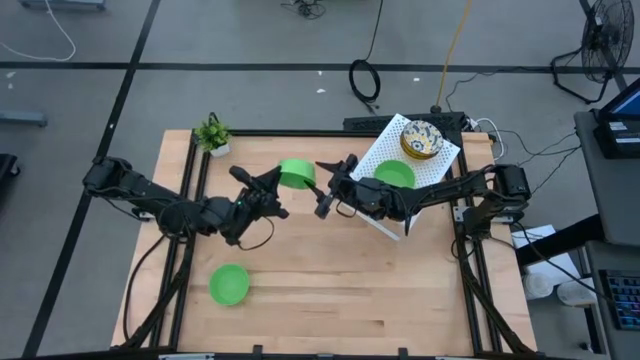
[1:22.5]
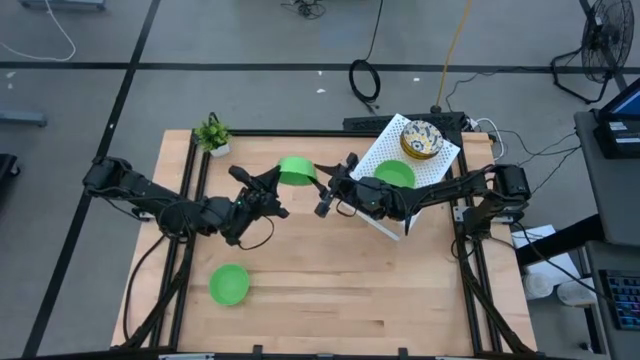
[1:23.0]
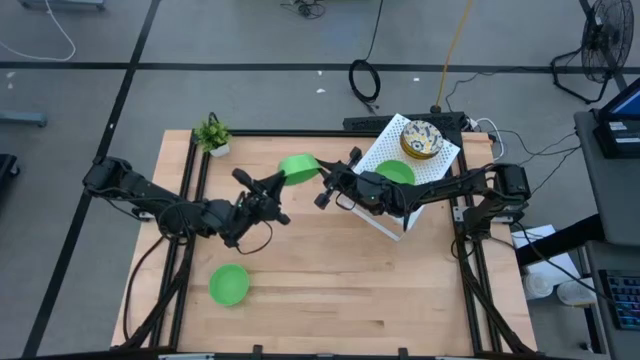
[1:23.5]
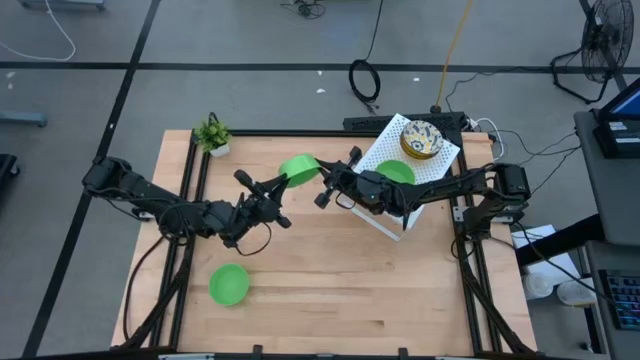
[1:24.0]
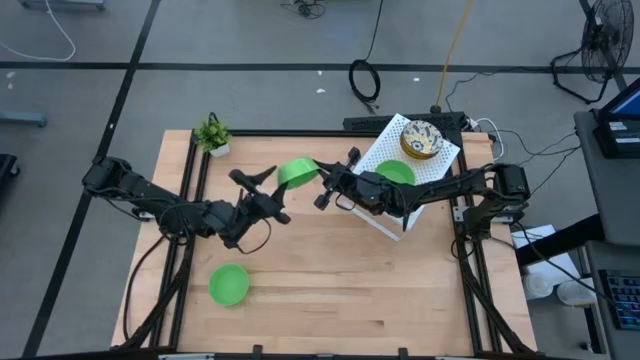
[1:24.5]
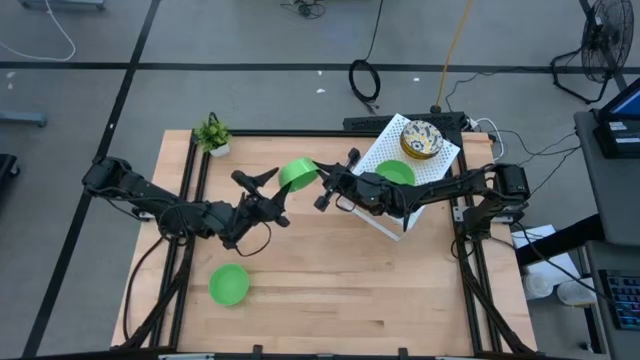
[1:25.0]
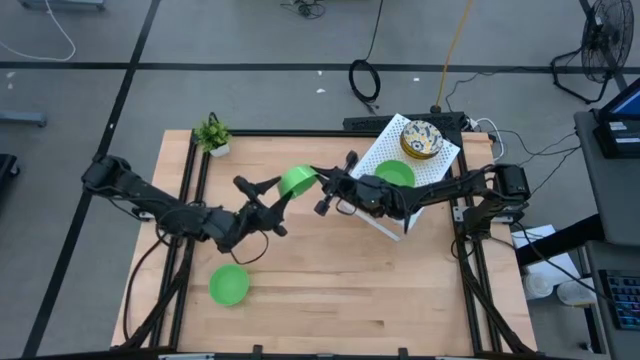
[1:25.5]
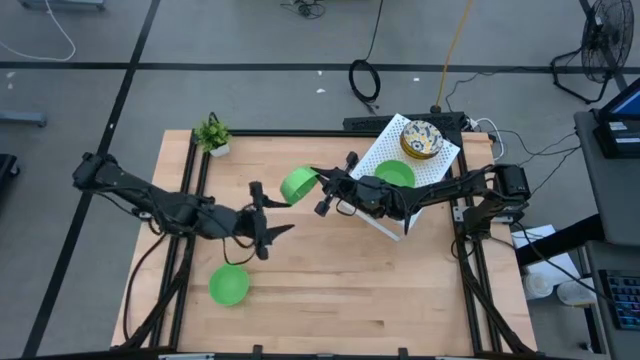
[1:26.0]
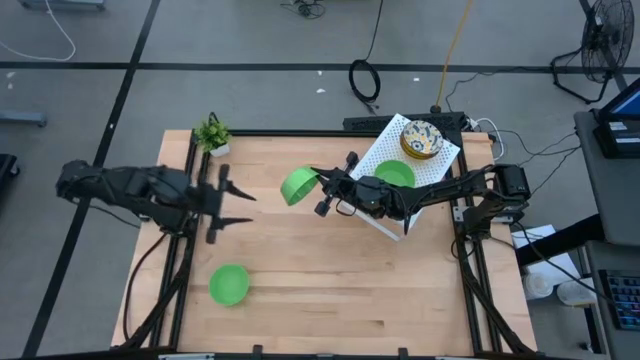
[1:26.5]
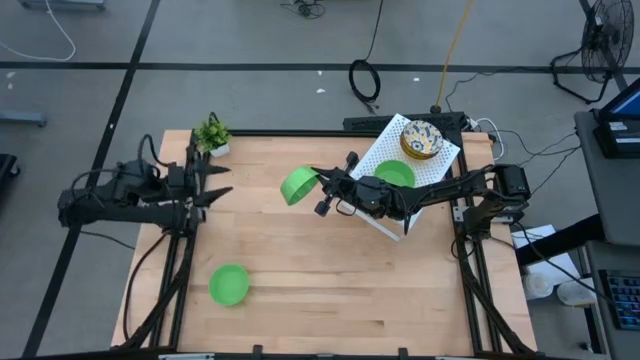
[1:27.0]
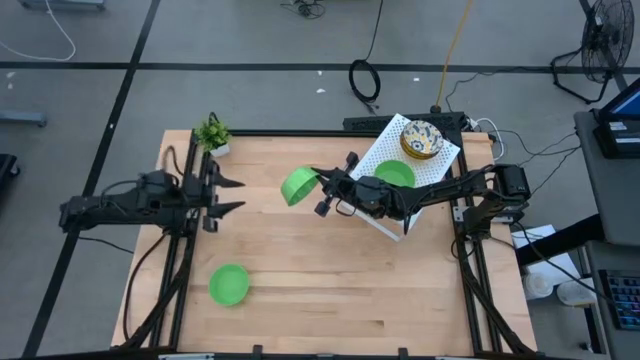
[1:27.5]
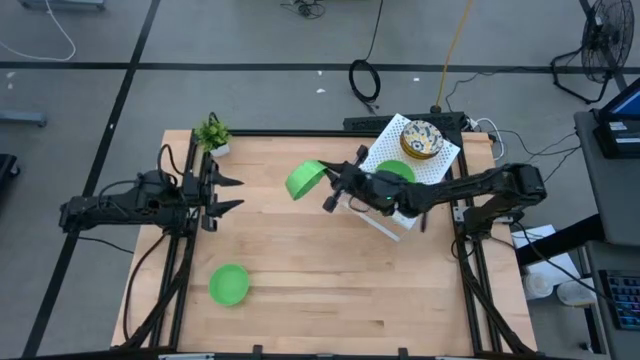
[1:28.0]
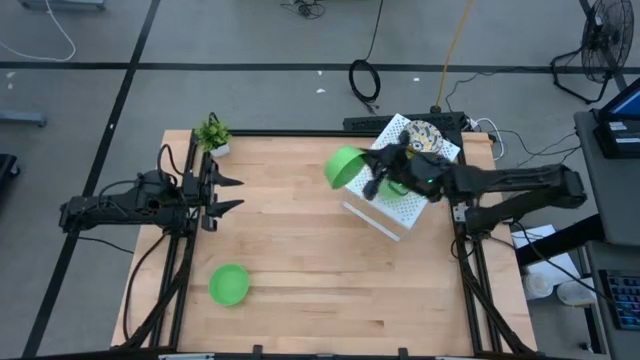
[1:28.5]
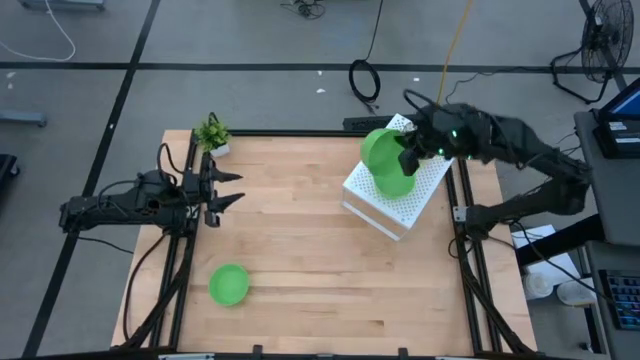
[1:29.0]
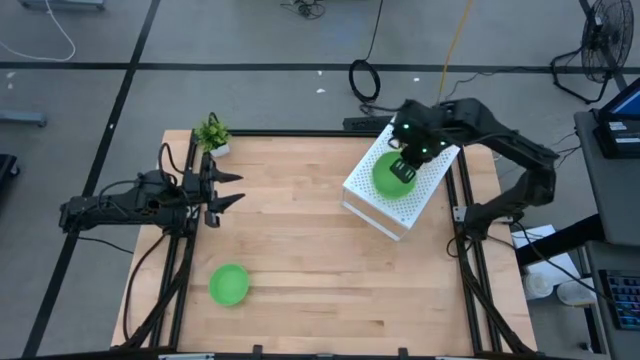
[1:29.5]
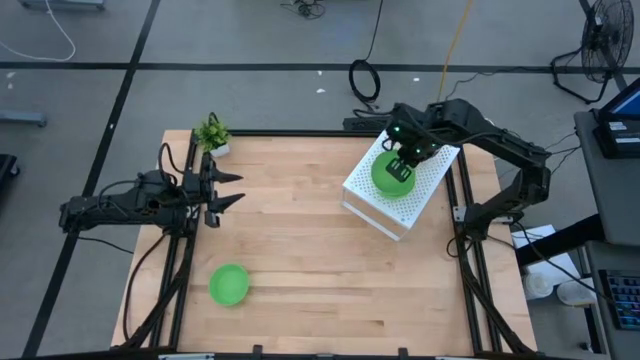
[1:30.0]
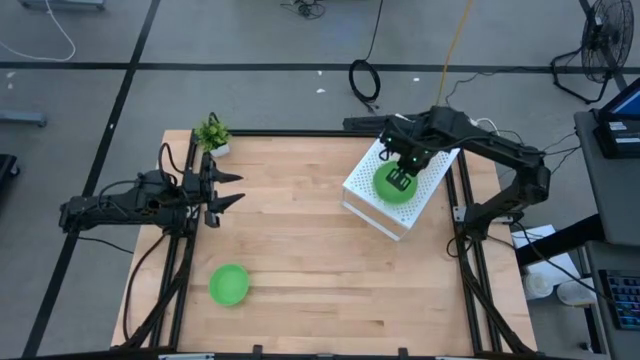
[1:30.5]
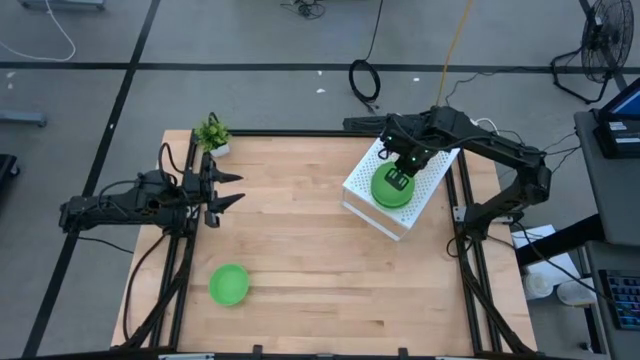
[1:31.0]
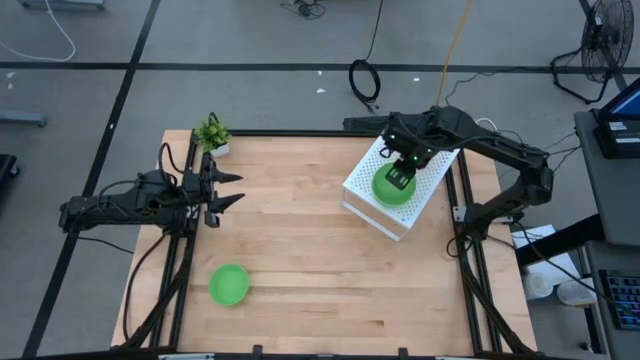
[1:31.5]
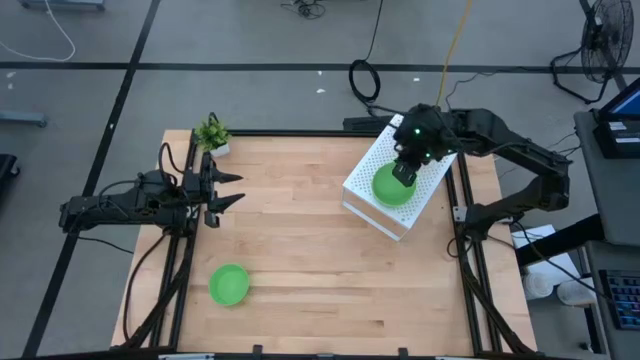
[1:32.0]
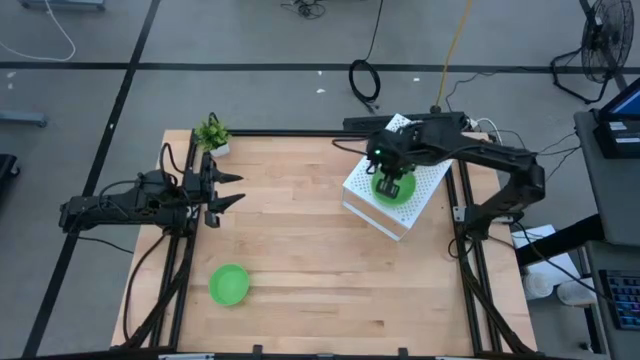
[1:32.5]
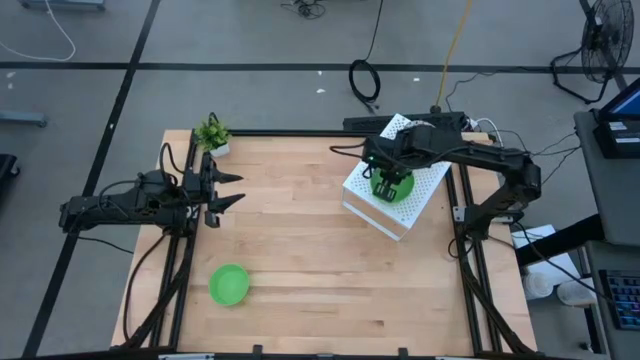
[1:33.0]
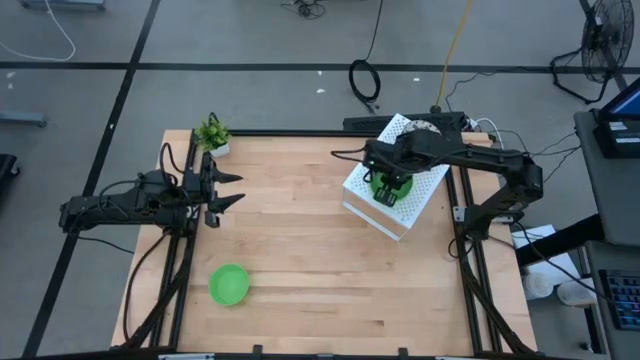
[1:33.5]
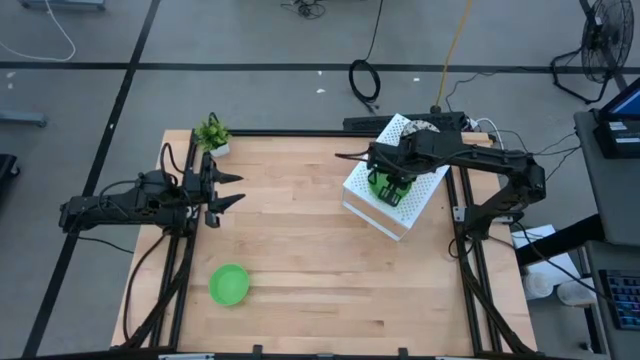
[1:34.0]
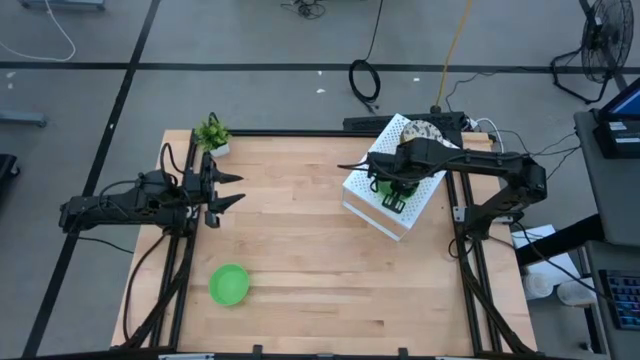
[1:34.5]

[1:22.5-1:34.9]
Task: Pick & Place Mini bowls
Stack the right green bowl on top of the other green bowl on the shelf

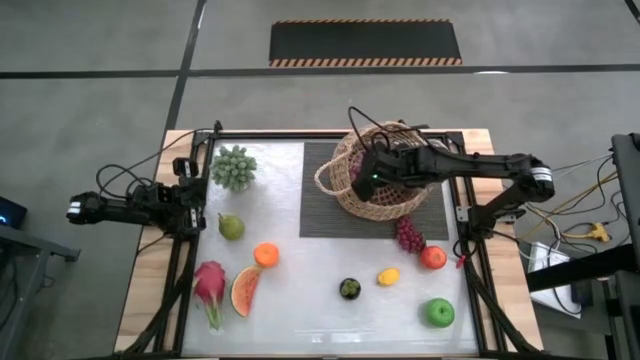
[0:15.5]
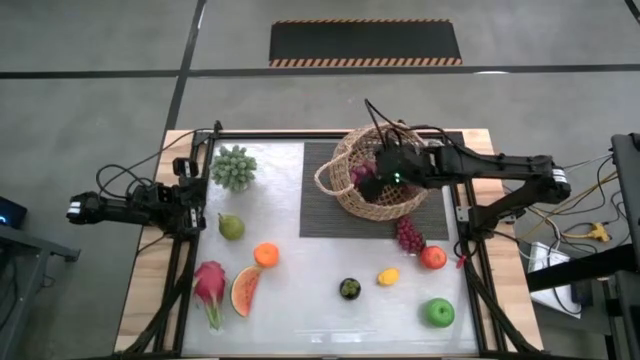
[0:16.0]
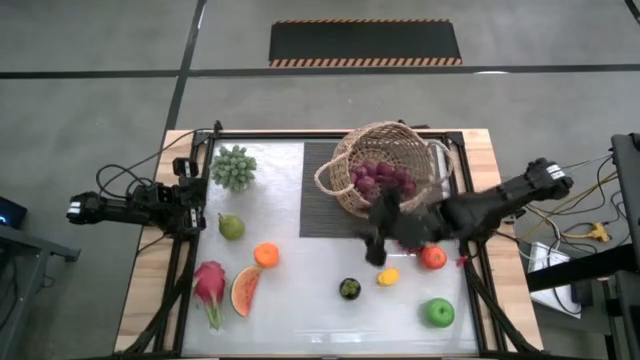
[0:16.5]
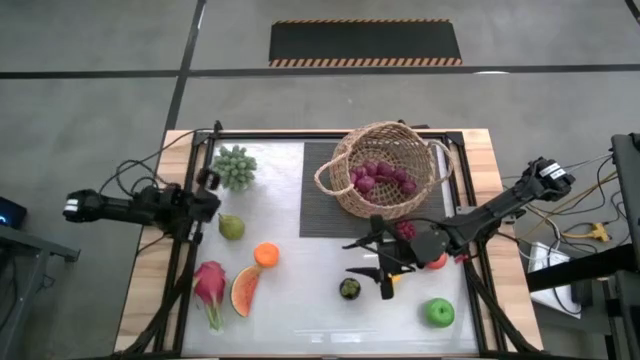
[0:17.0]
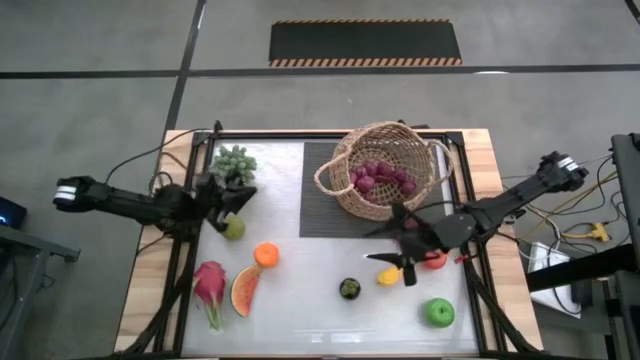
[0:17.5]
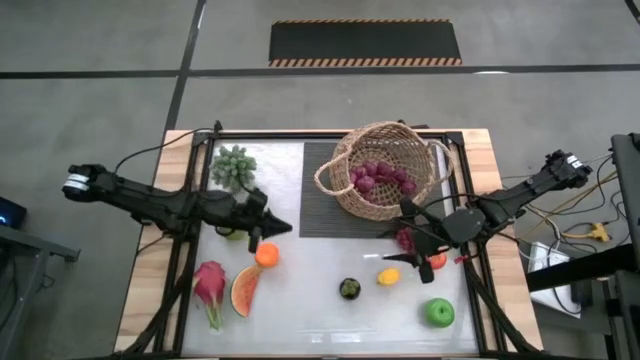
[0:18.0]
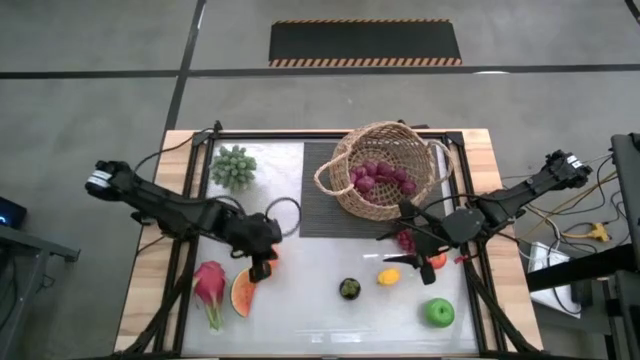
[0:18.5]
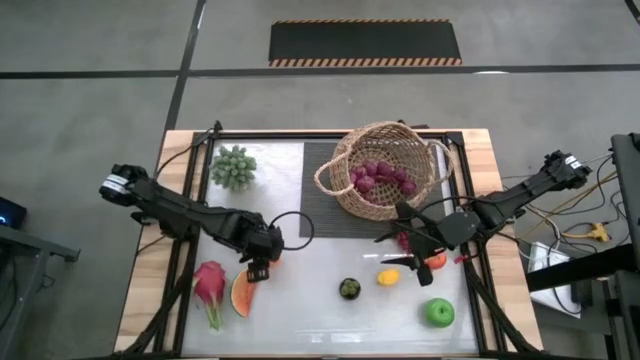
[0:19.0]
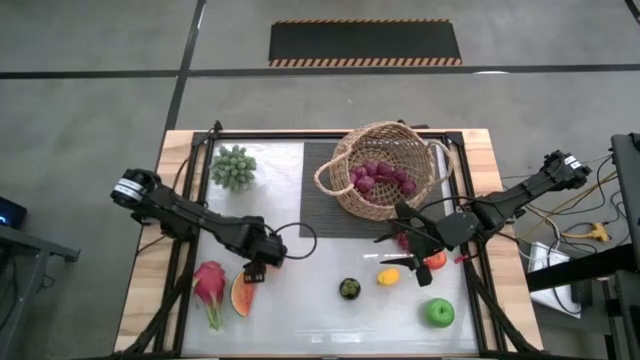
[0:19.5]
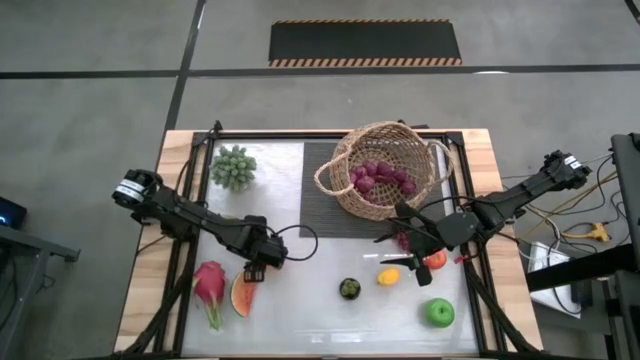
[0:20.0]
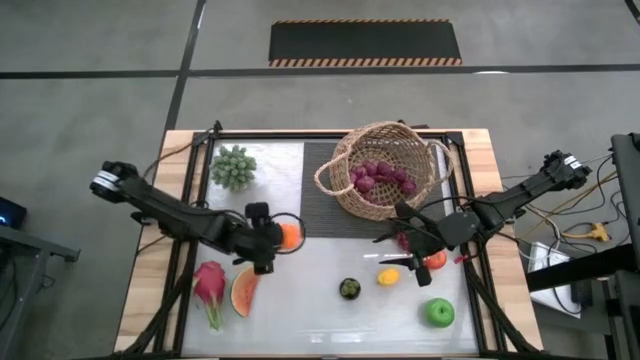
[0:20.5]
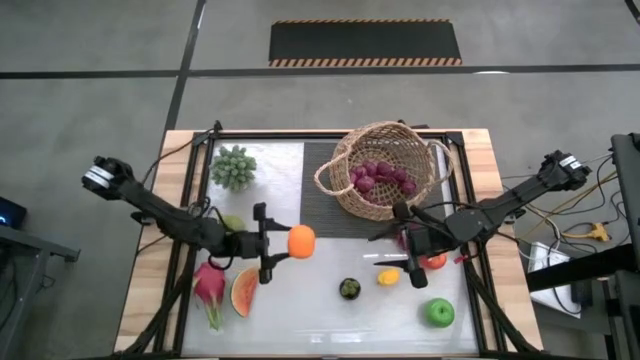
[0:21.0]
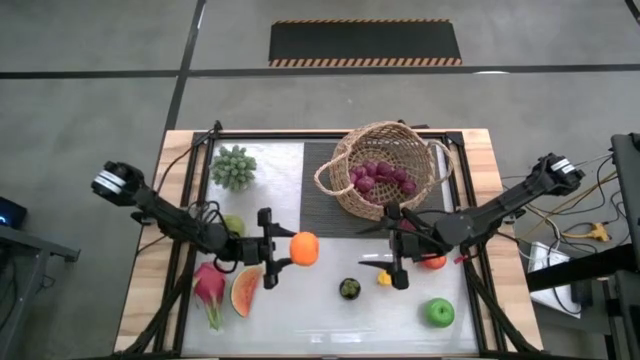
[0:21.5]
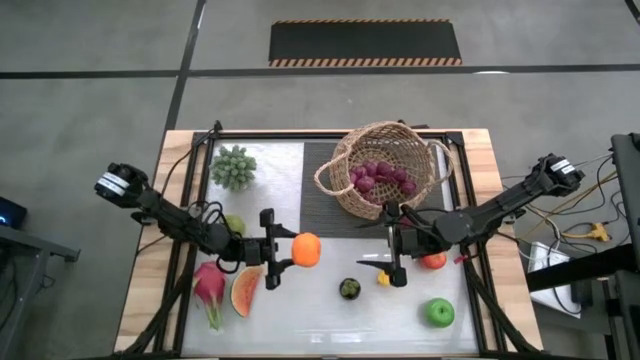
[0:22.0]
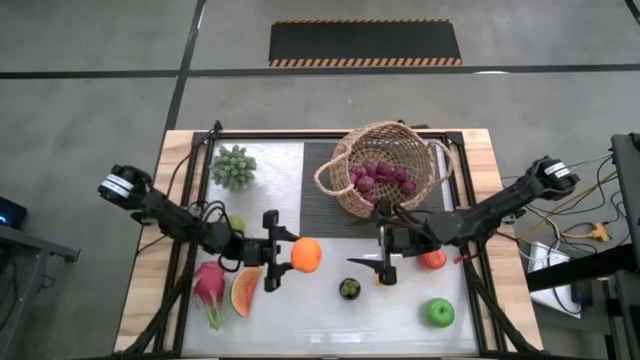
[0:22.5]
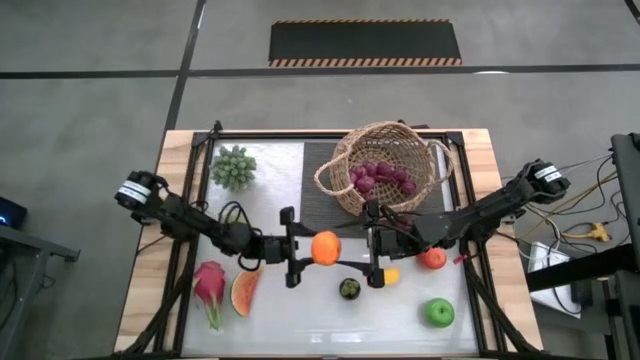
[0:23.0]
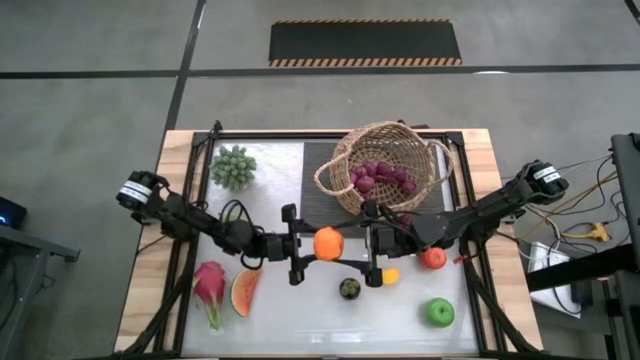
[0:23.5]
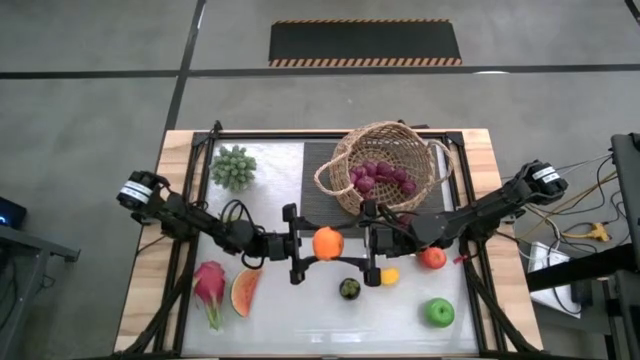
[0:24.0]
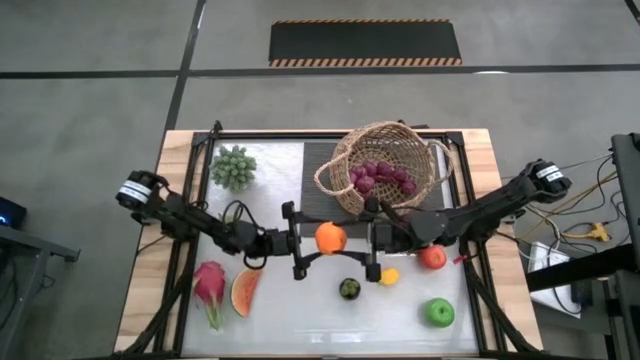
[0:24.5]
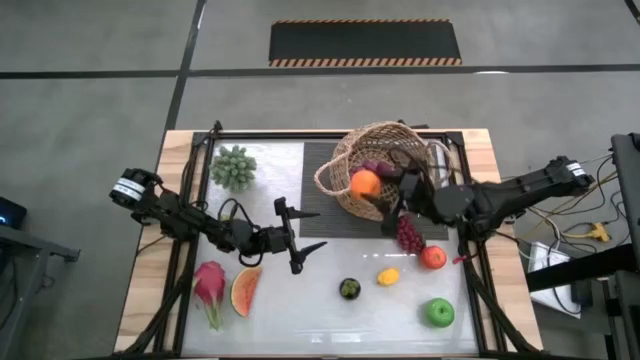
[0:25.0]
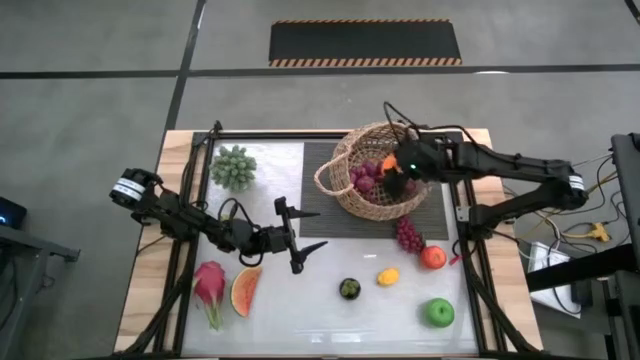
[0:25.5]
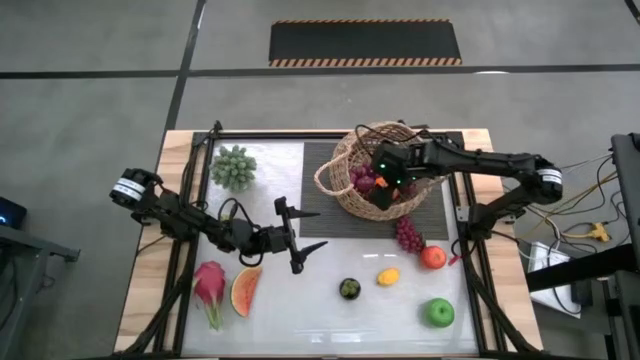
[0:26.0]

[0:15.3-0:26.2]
Task: Build produce basket
Put the orange into the brown basket
